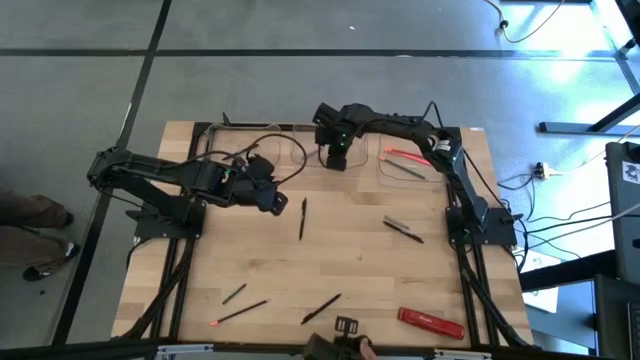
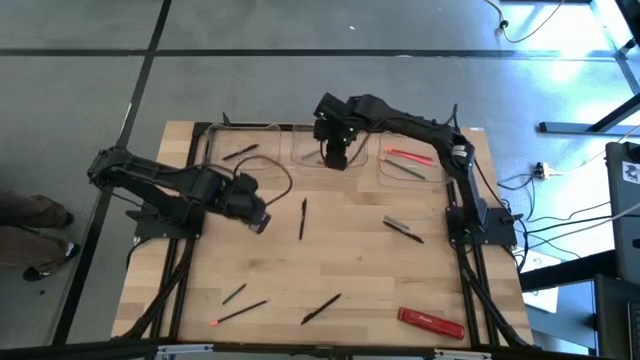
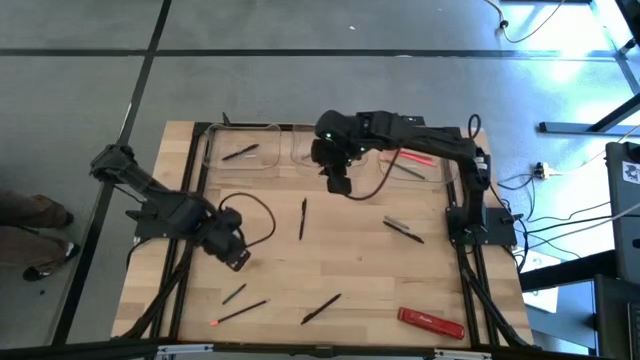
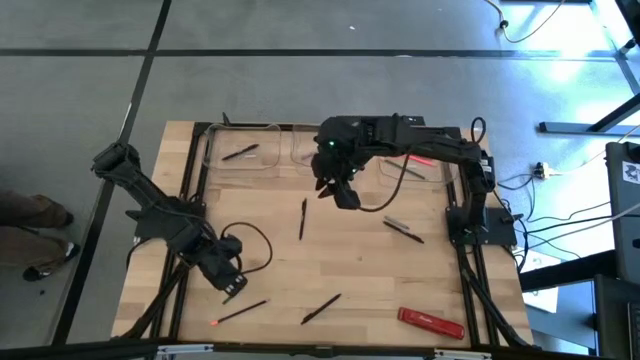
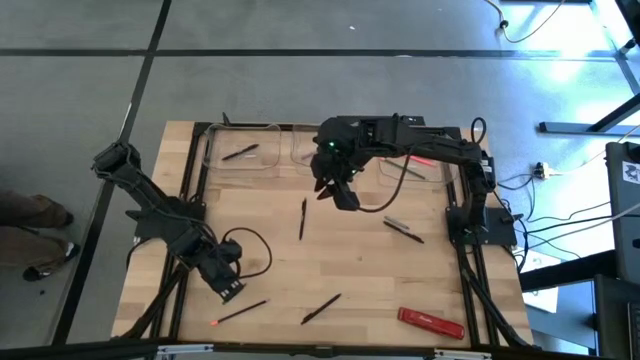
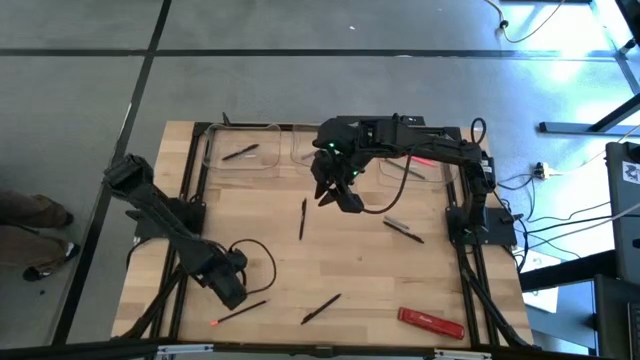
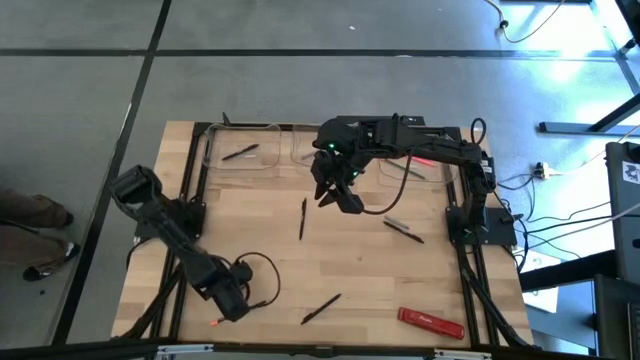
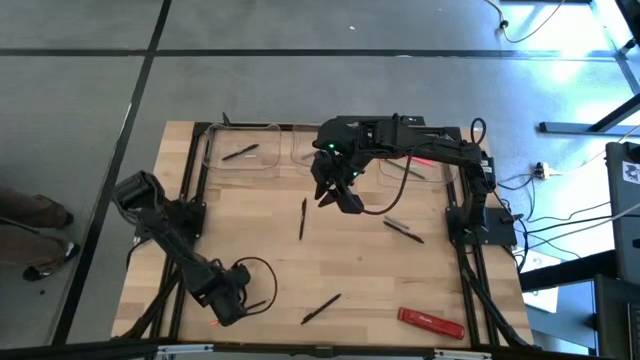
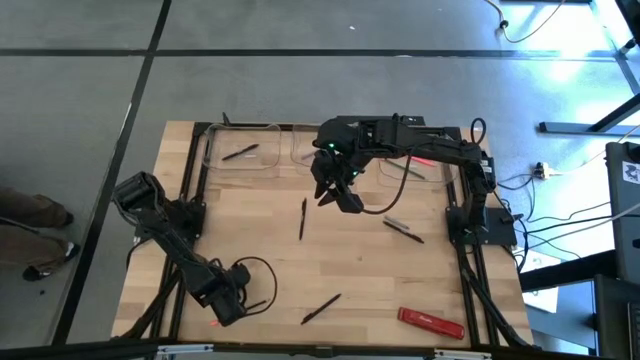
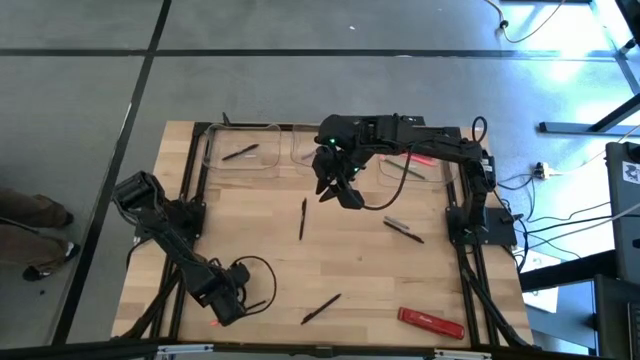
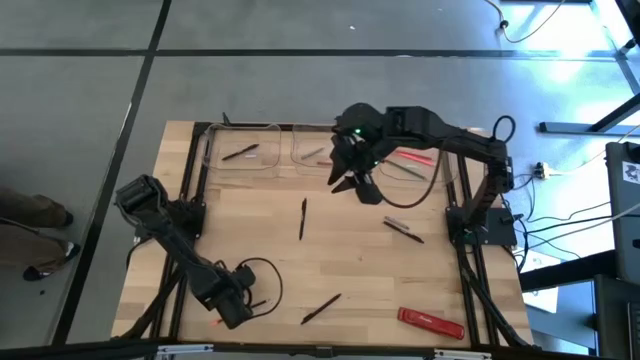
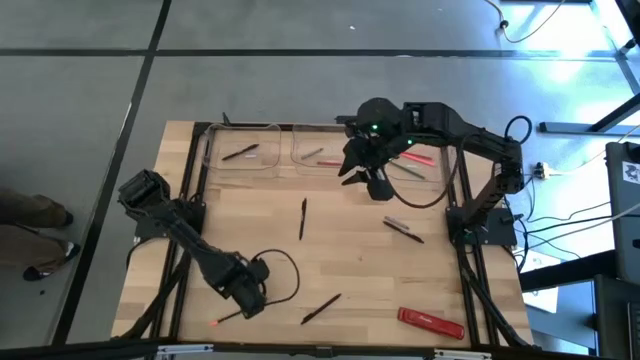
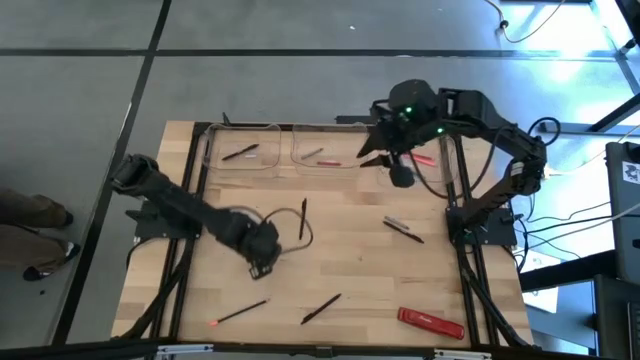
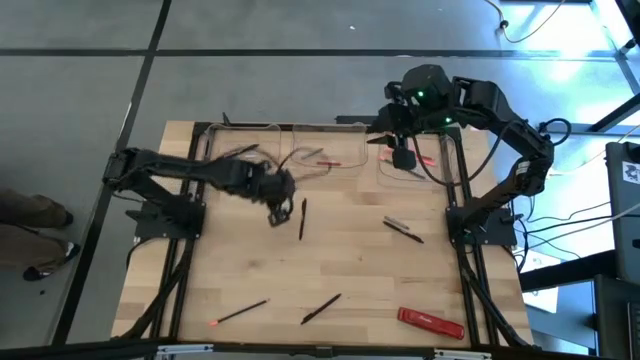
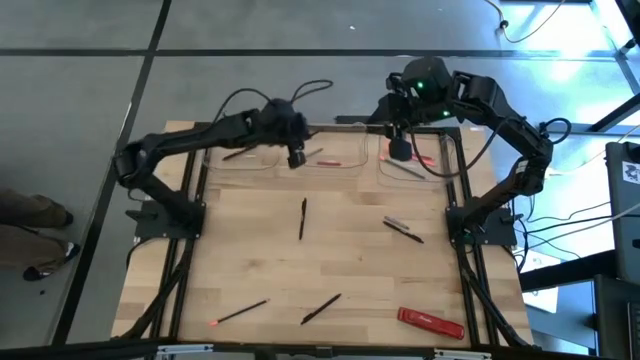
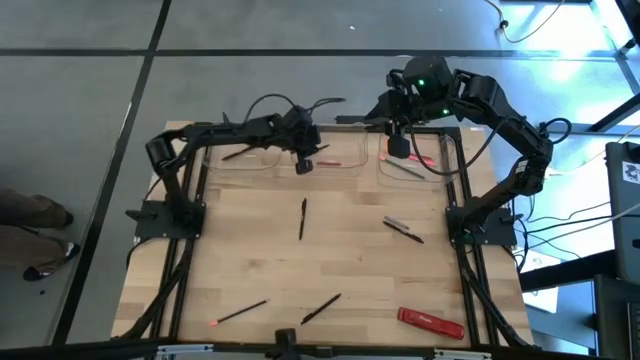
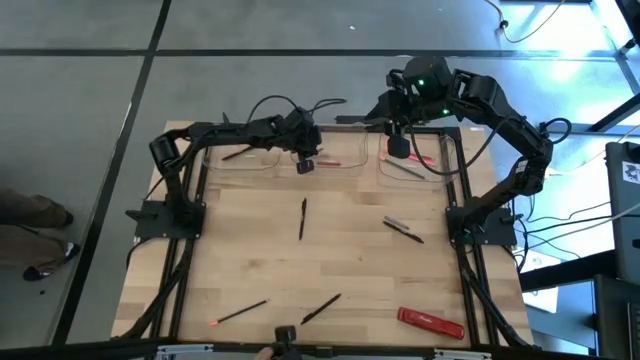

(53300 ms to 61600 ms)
Task: Sort crayons/erasers/pens/pencils in bins
Put the green crayon into the center transparent bin

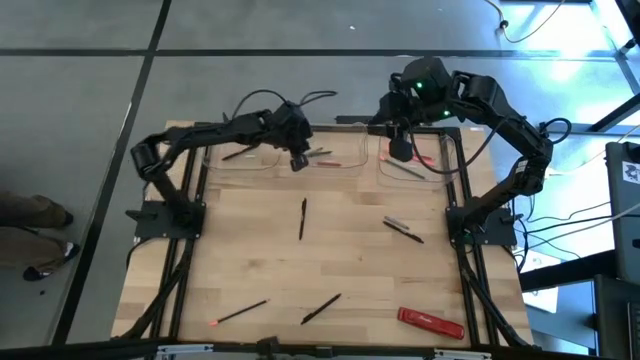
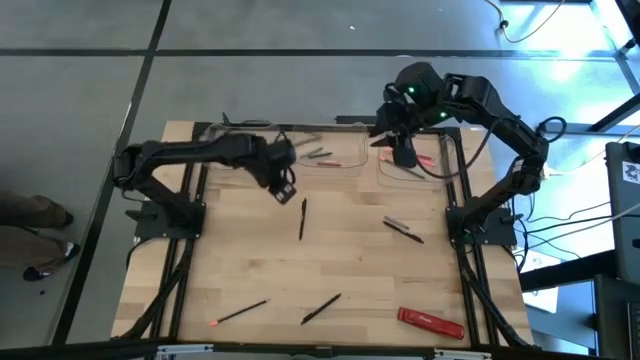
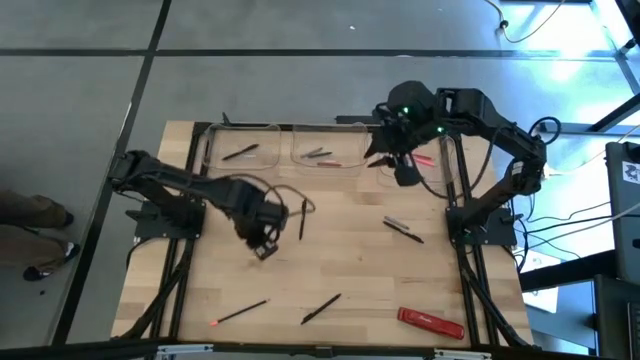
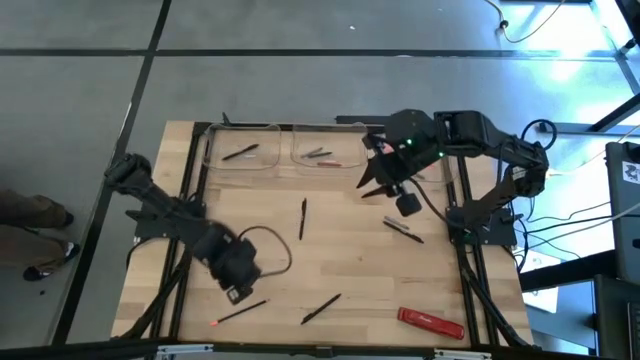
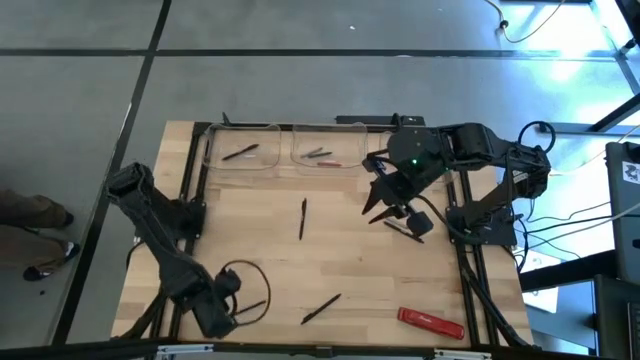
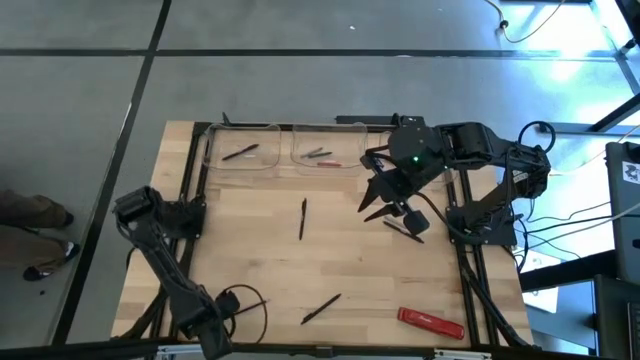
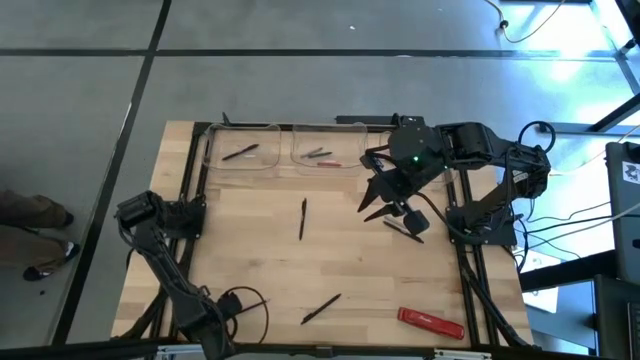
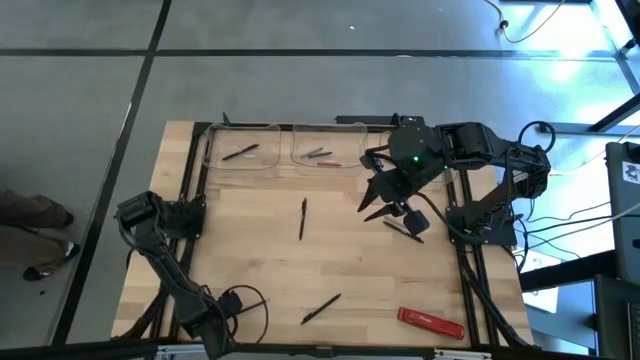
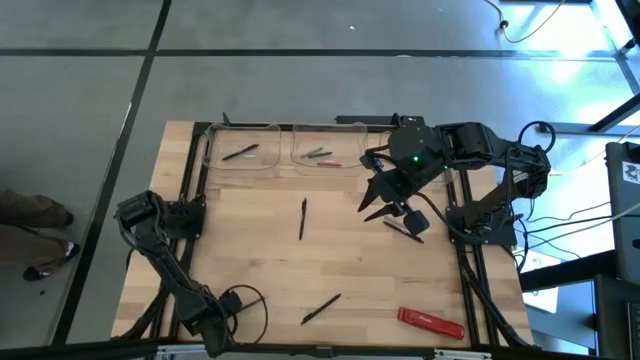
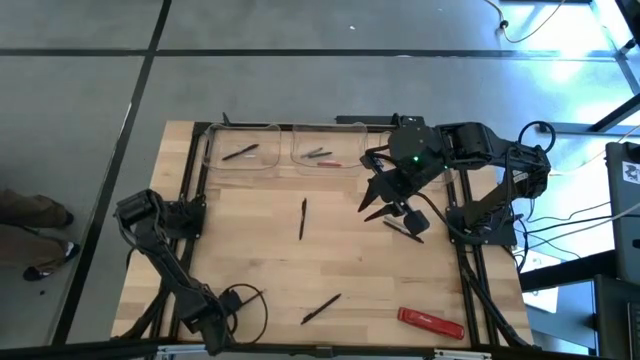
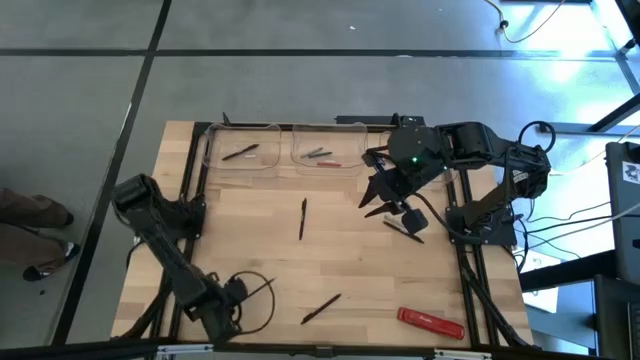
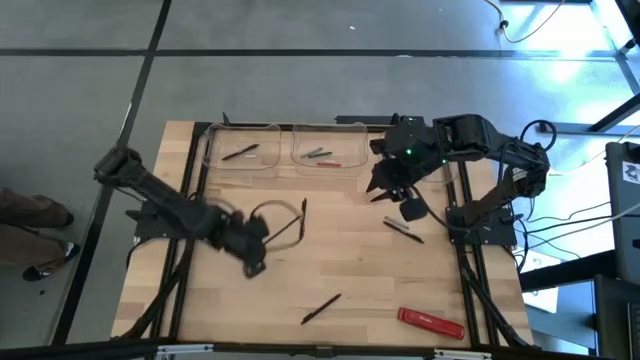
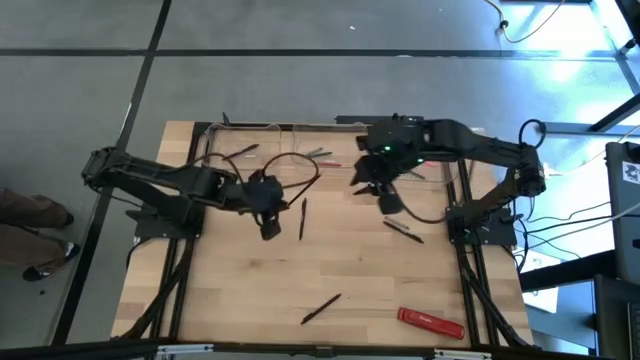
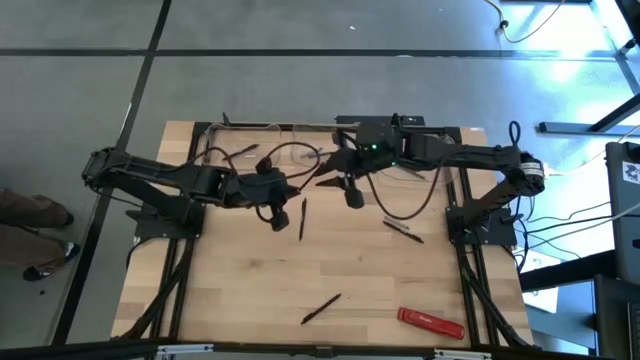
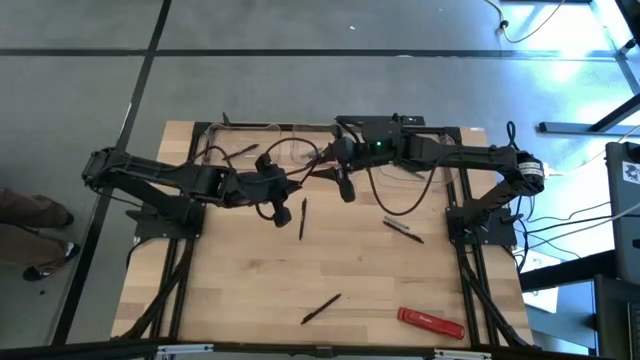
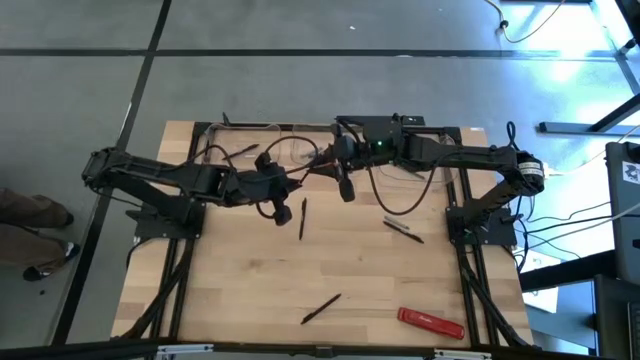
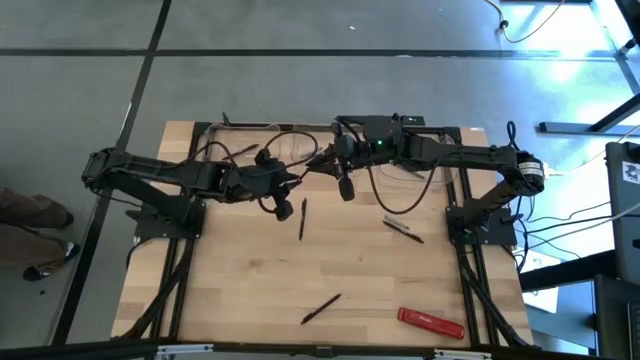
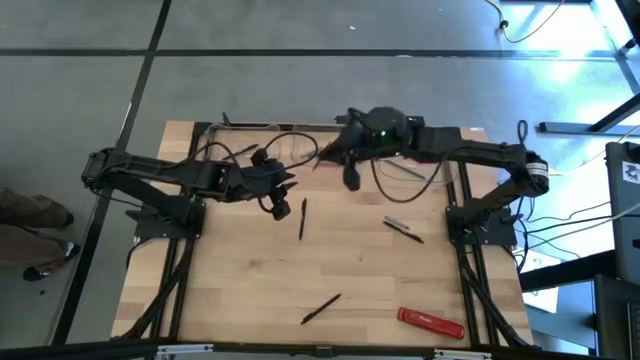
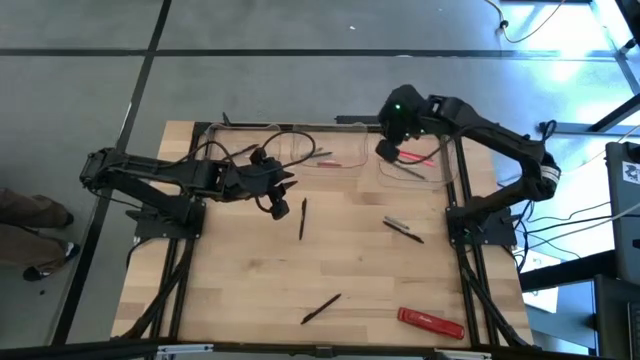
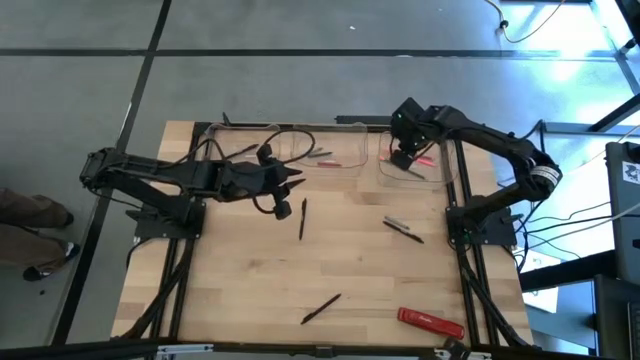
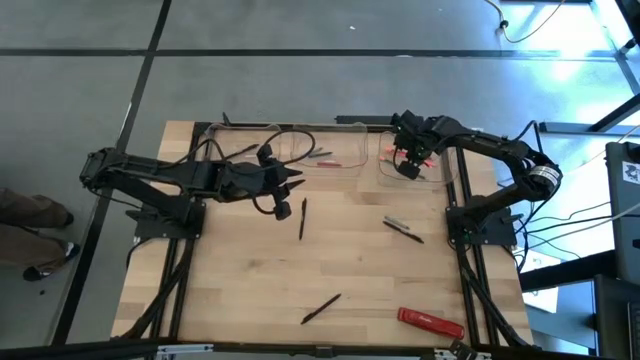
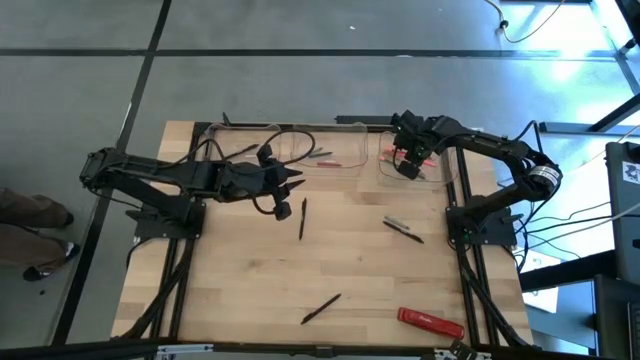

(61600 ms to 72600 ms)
Put the black pencil into the right transparent bin

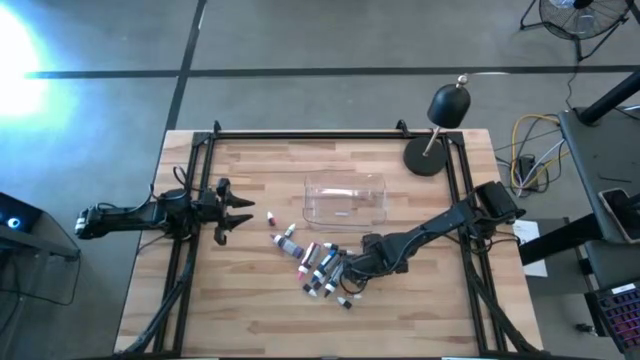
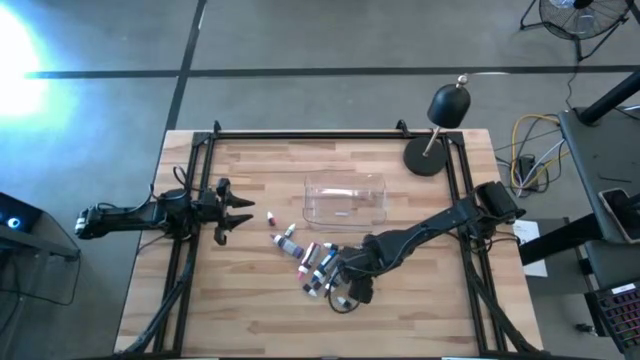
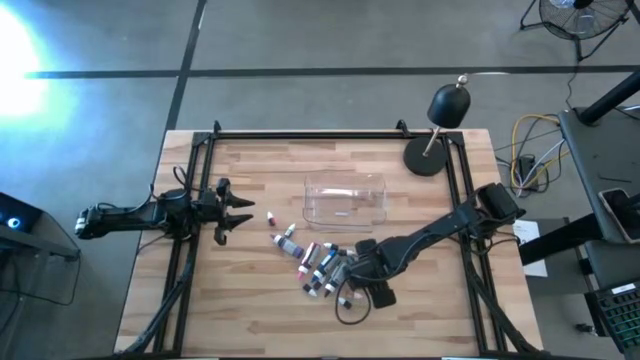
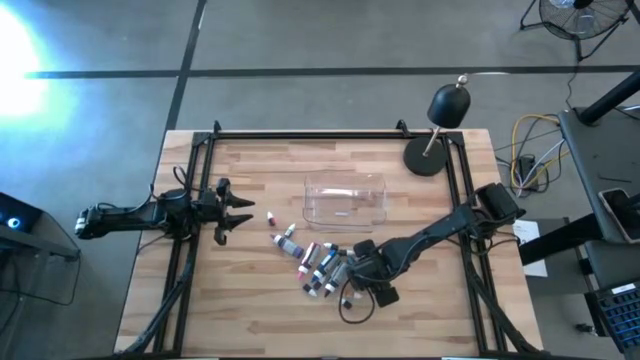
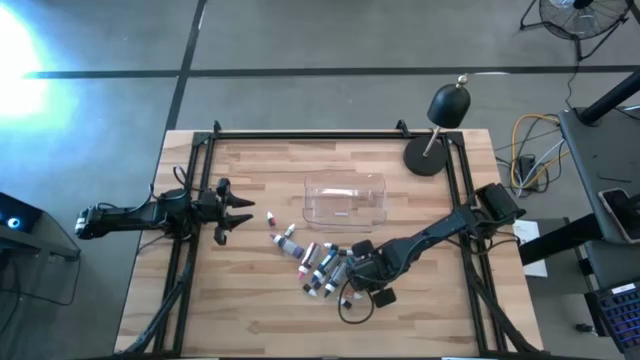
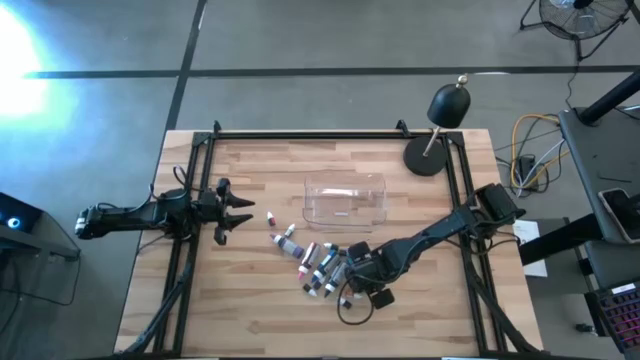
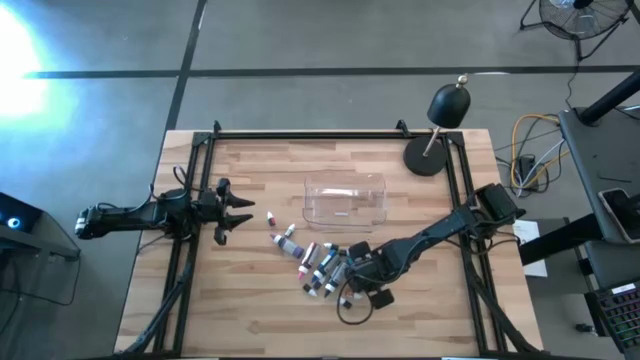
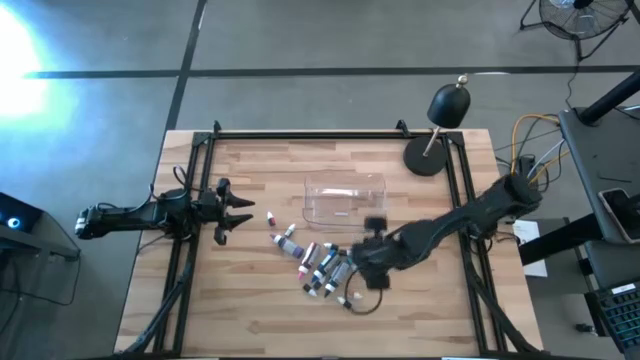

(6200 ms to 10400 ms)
Task: Pick & Place food coloring
Put the small black food coloring bottle into the transparent bin
